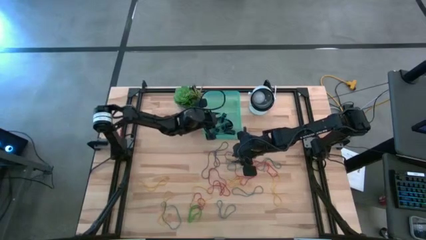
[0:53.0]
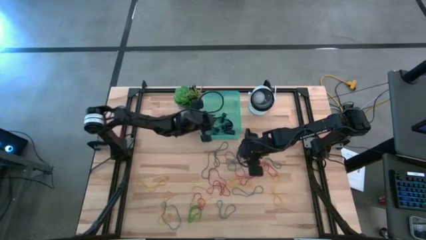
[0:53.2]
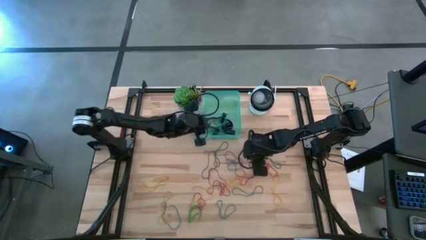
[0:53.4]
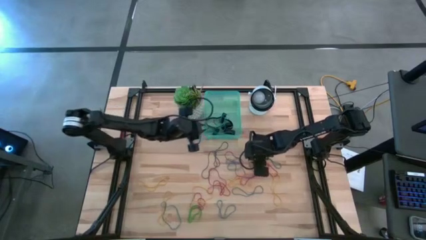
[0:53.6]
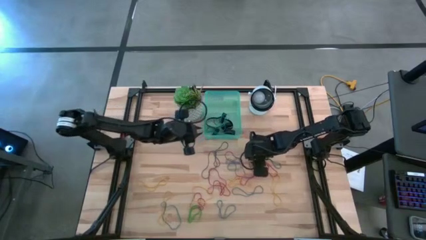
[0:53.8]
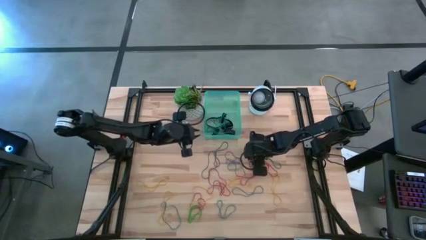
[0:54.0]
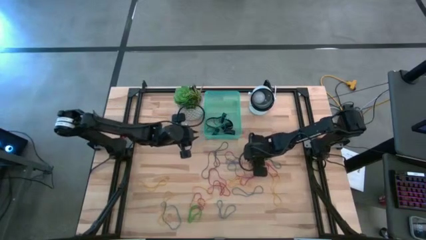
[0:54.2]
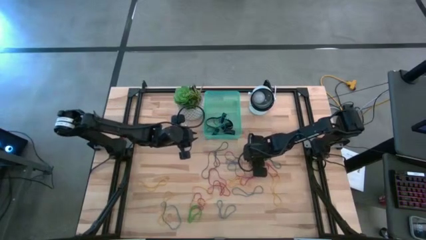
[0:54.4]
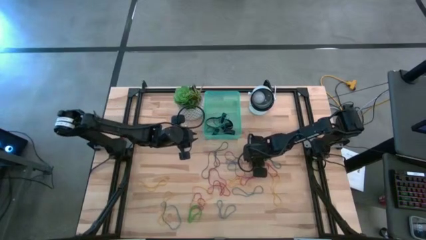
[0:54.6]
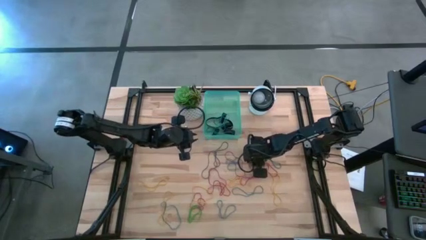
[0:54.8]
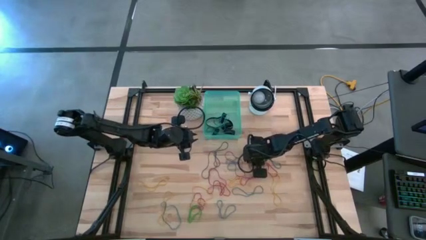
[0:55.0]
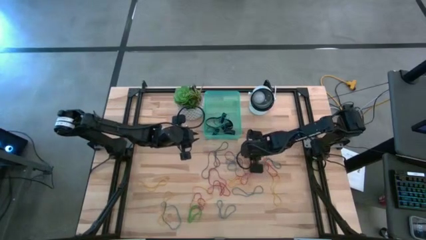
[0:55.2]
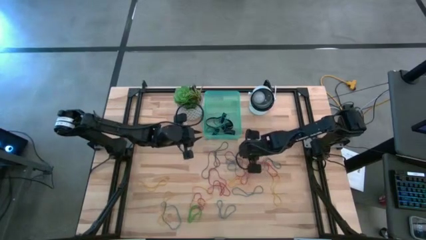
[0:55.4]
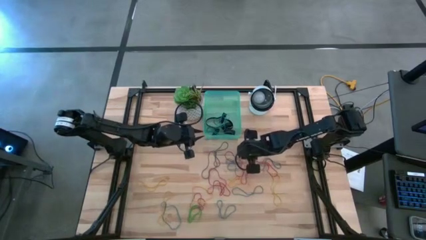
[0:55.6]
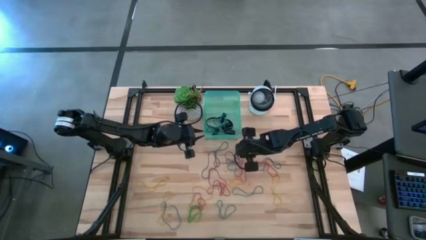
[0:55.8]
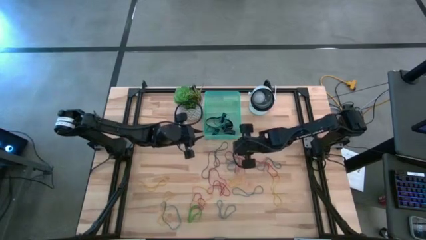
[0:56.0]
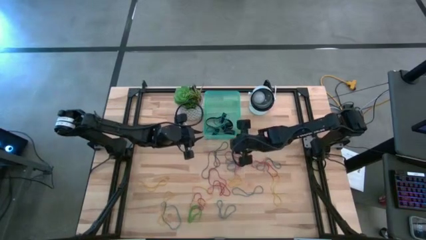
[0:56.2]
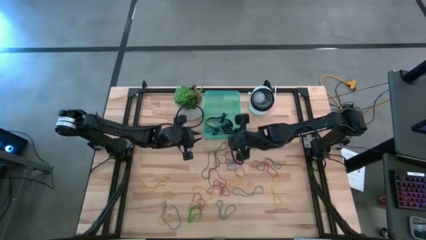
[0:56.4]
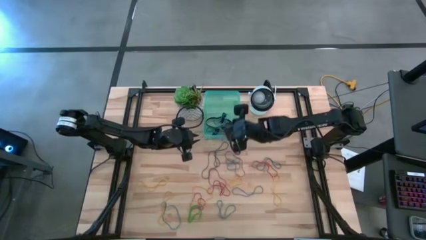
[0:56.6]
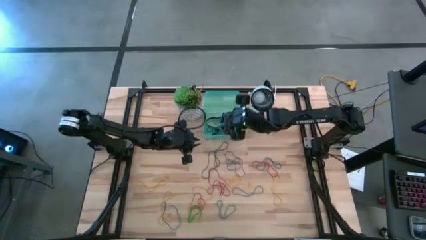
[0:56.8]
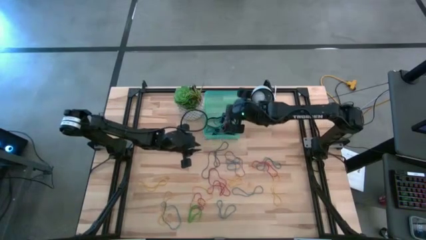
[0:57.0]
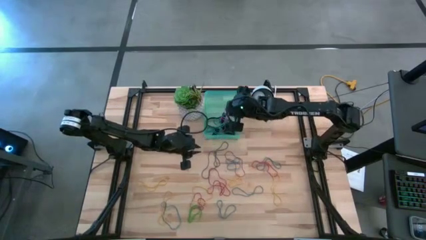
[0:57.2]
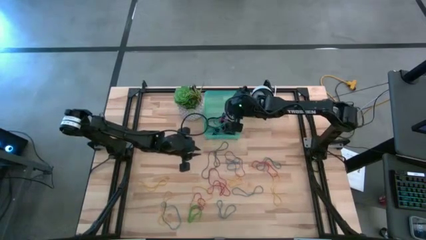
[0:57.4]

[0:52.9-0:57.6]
Task: Pick and place rubber bands into bin
Put the red rubber band into the green bin

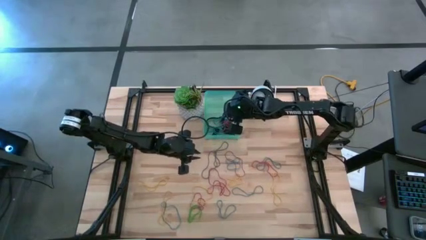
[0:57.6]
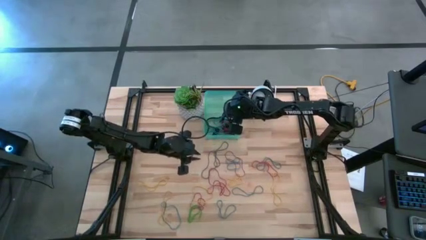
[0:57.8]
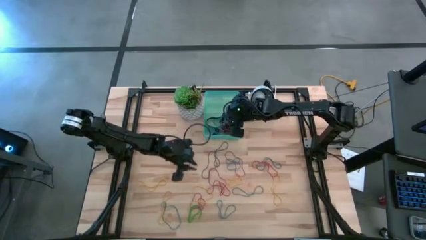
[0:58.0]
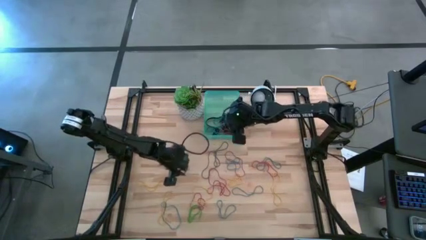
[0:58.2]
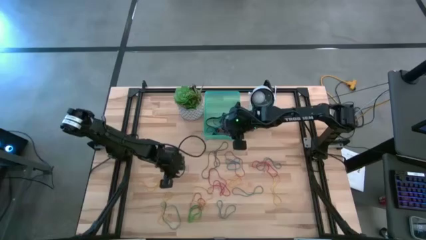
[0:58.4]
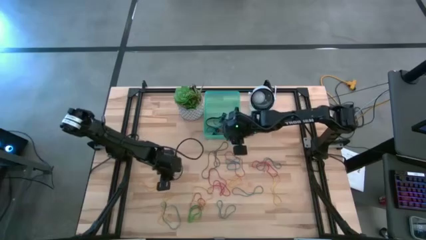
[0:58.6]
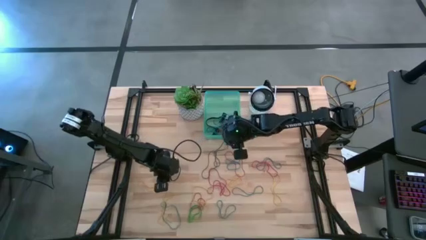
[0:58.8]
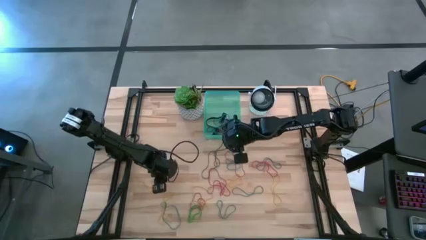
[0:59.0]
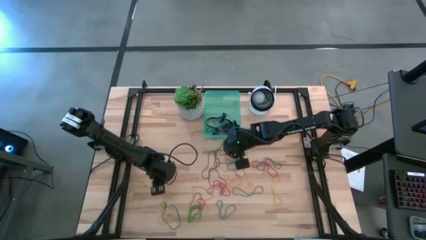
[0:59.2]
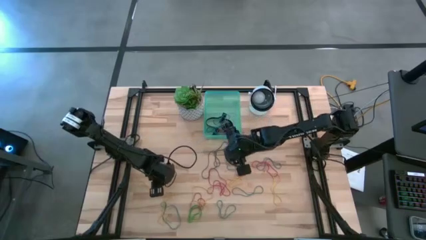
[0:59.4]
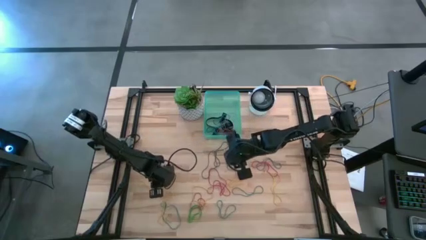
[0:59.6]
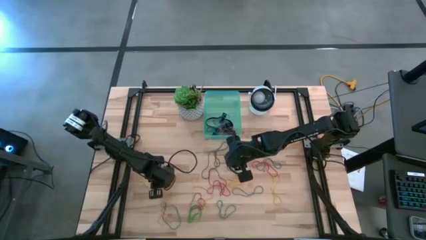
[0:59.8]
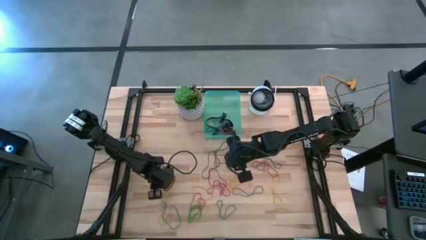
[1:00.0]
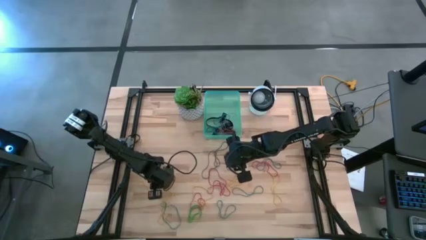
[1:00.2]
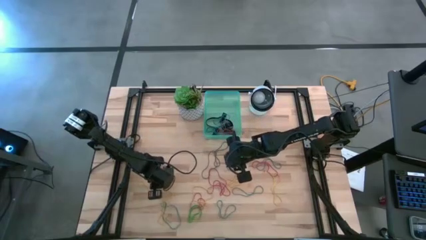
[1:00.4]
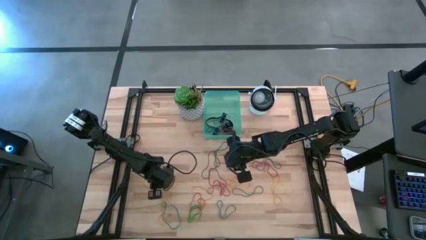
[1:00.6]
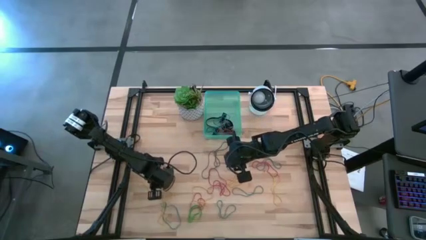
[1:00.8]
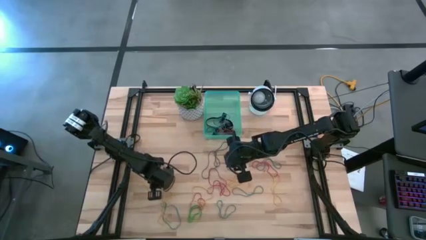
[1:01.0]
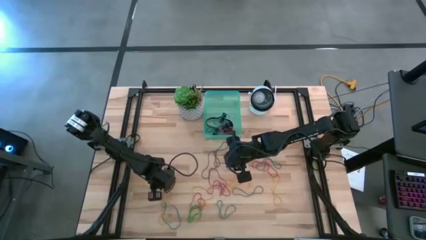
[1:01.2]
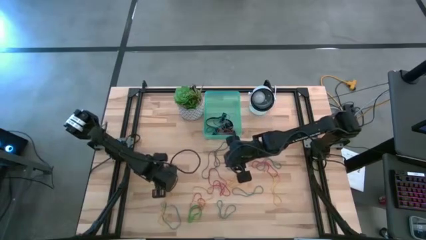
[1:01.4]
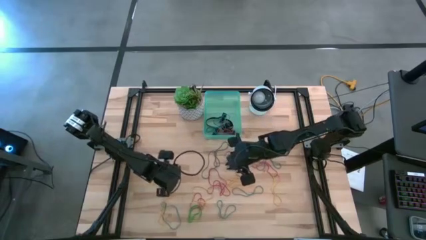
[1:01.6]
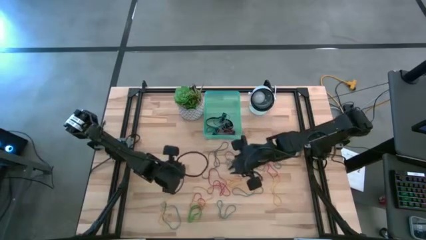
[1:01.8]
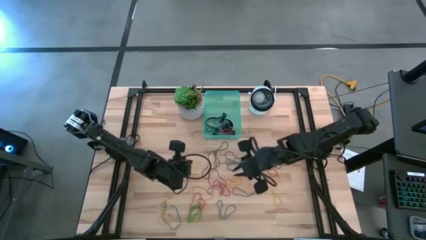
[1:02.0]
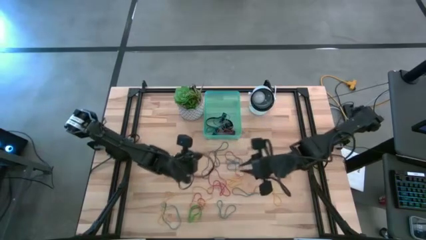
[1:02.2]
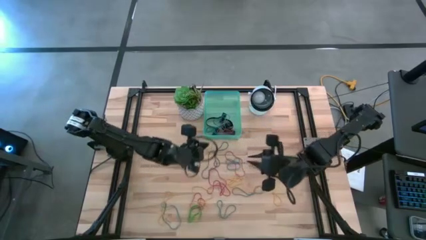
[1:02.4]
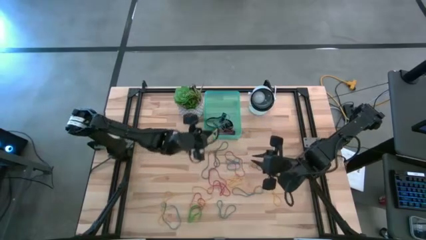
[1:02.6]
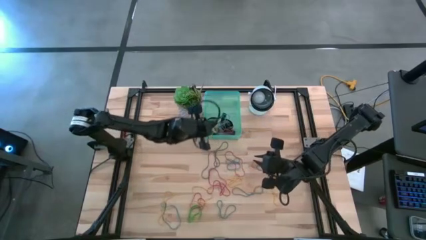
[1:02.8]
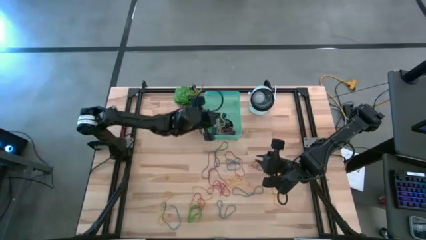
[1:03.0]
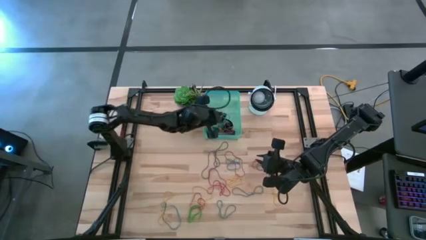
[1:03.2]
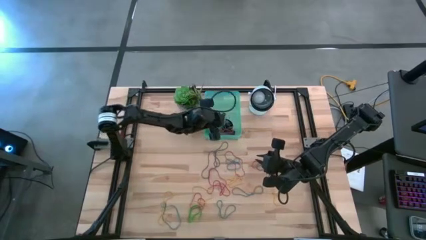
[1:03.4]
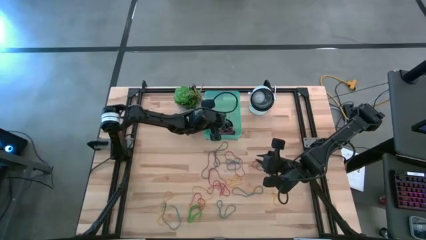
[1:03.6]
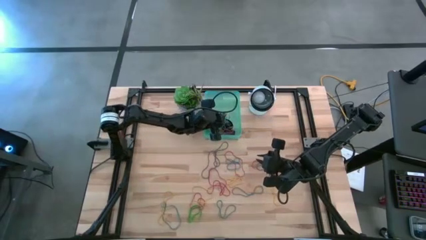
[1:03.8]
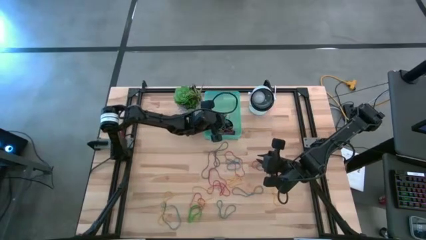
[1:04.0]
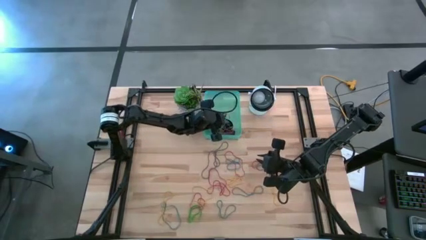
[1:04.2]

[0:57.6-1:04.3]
Put the yellow rubber band into the green bin

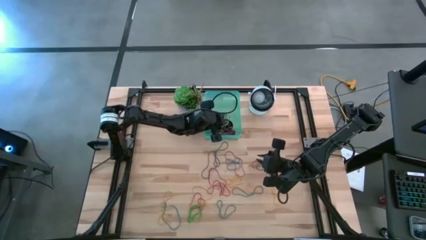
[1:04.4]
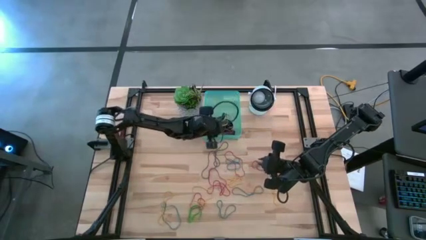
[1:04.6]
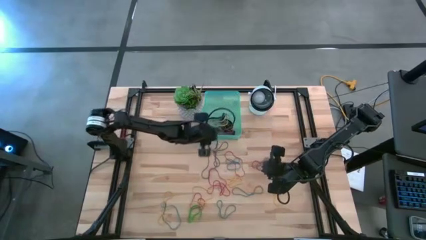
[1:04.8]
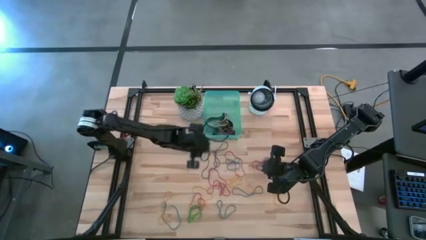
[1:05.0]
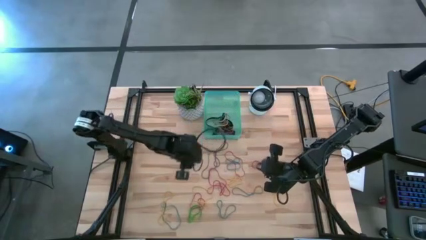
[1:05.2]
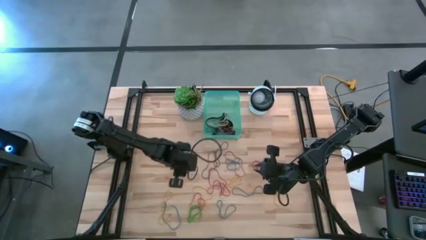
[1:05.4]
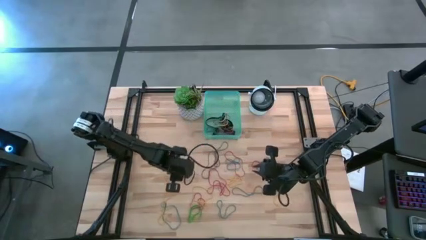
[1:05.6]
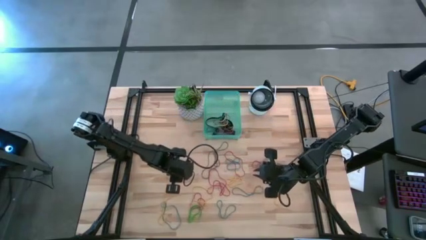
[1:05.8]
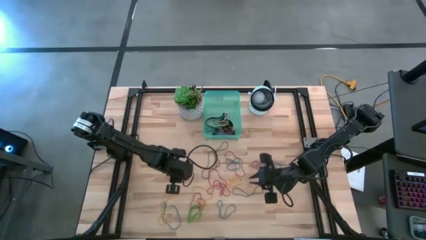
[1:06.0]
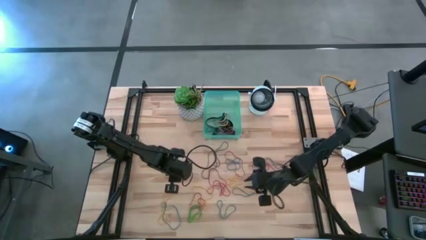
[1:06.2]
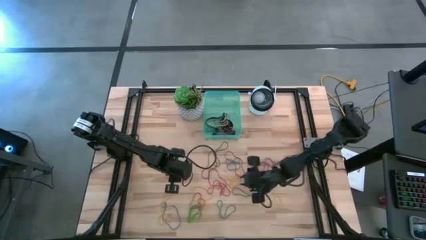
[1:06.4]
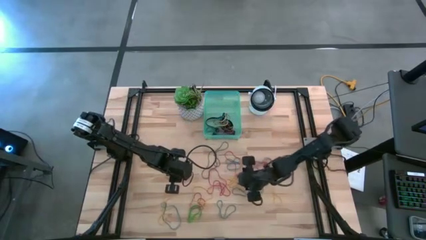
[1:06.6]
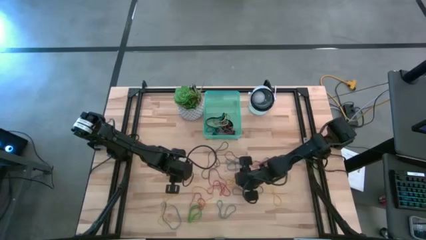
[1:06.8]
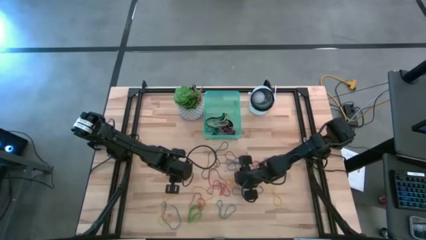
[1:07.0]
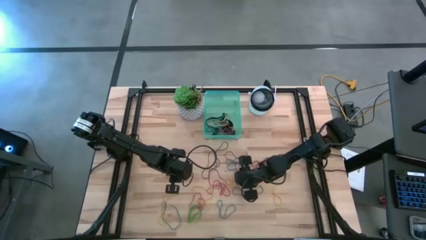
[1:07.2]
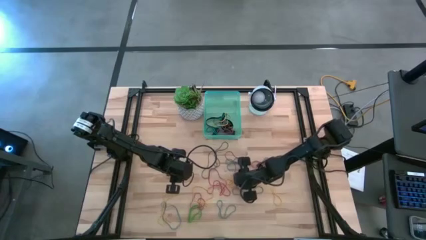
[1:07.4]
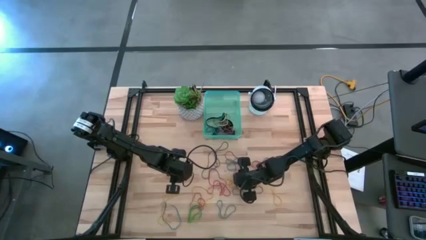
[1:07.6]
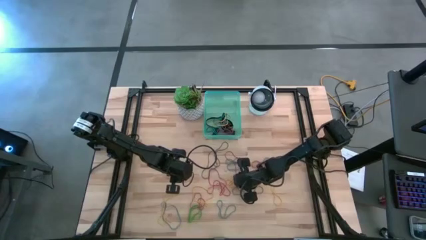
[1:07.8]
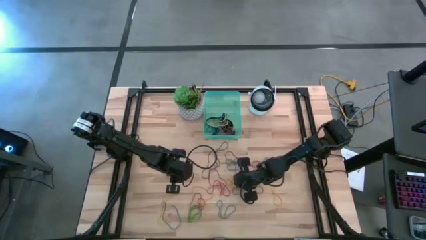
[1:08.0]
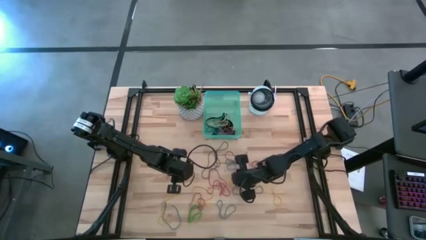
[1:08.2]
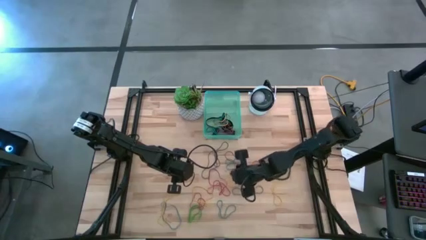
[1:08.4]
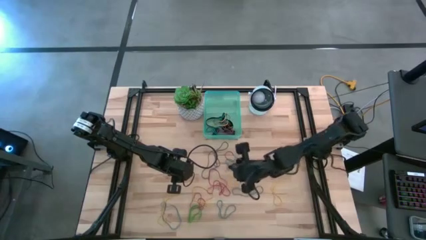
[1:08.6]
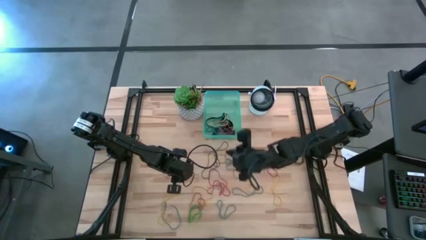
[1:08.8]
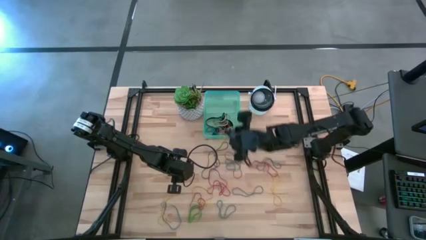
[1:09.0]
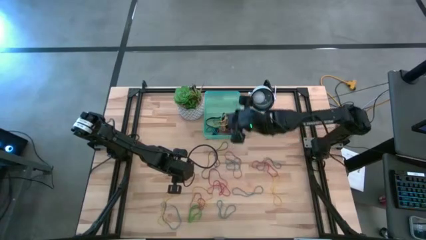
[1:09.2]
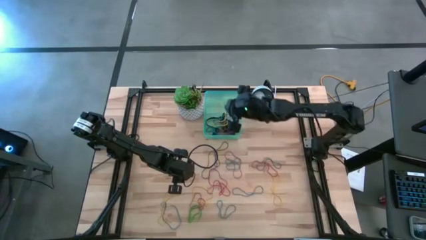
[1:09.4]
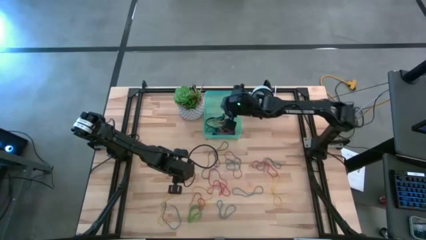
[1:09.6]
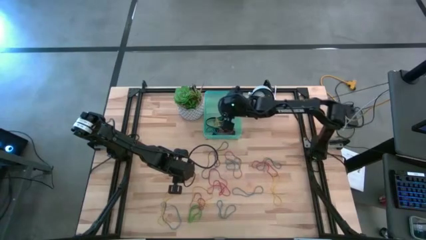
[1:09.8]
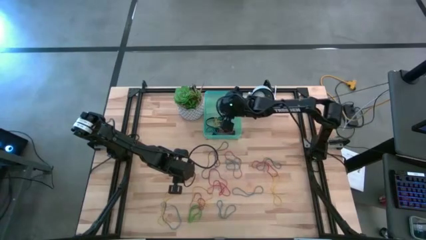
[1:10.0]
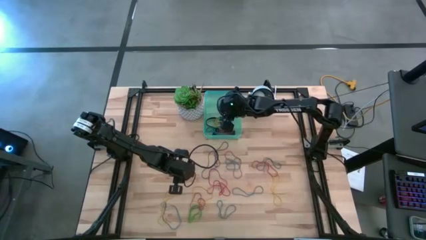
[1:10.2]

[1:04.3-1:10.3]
Put the yellow rubber band into the green bin
